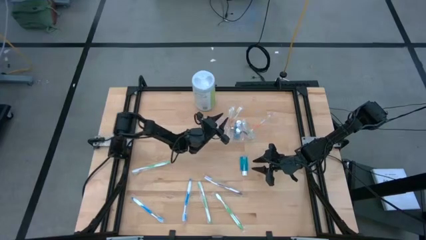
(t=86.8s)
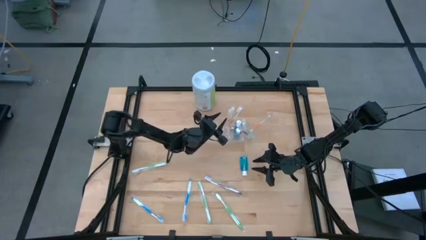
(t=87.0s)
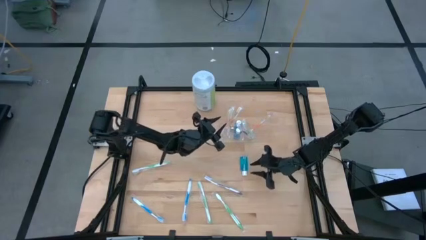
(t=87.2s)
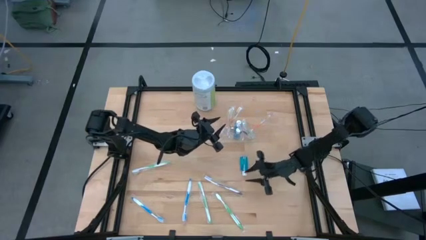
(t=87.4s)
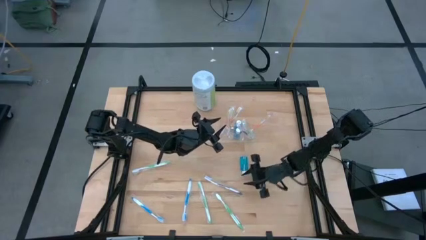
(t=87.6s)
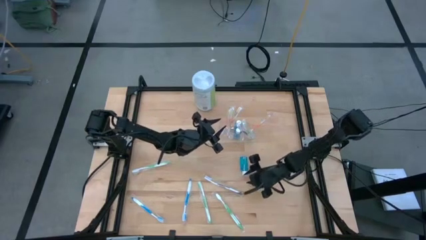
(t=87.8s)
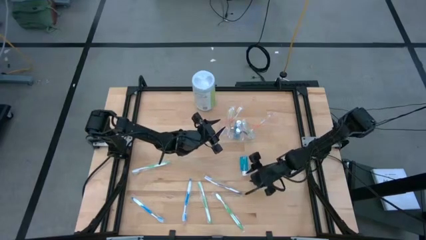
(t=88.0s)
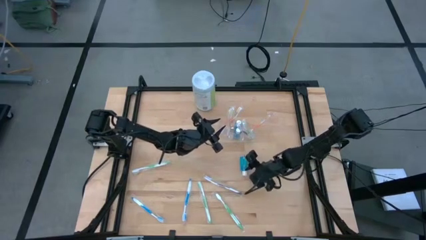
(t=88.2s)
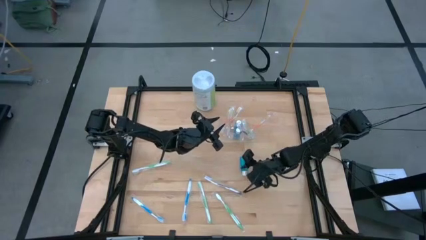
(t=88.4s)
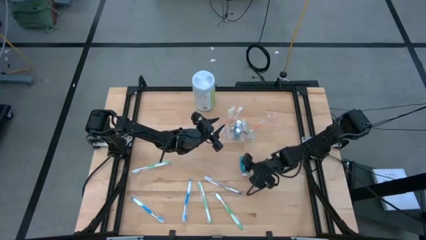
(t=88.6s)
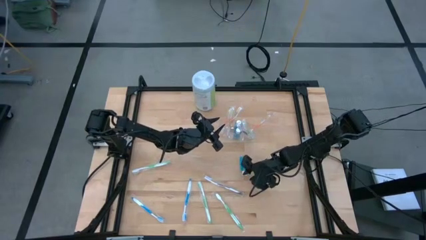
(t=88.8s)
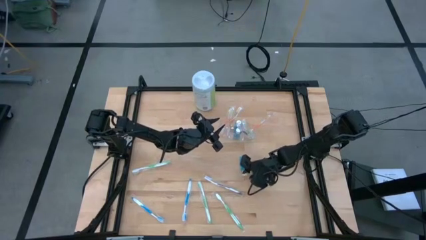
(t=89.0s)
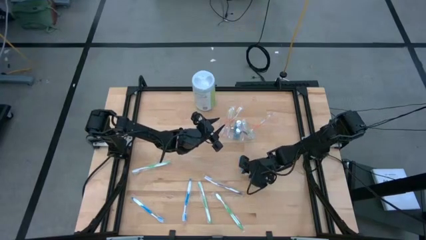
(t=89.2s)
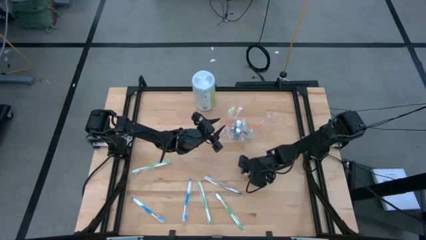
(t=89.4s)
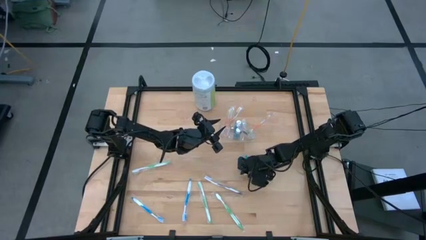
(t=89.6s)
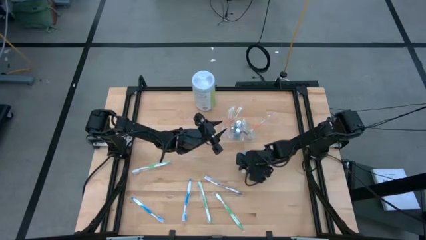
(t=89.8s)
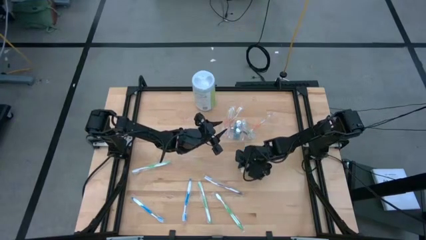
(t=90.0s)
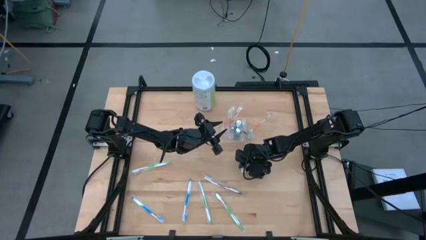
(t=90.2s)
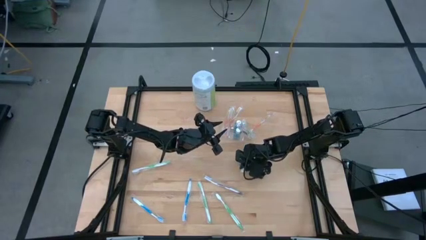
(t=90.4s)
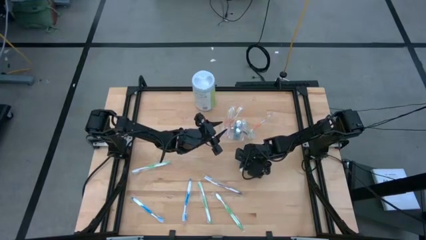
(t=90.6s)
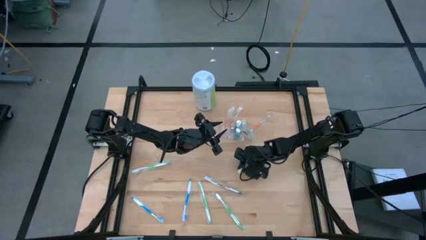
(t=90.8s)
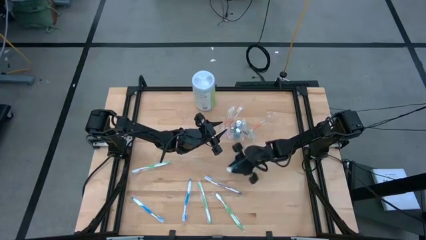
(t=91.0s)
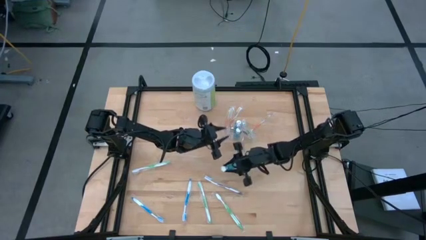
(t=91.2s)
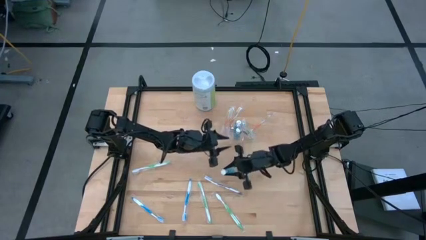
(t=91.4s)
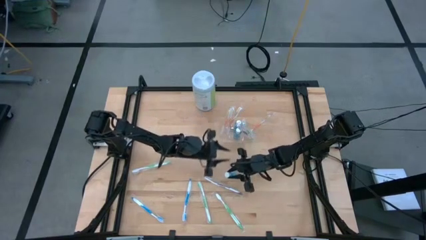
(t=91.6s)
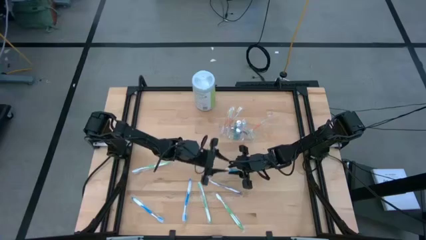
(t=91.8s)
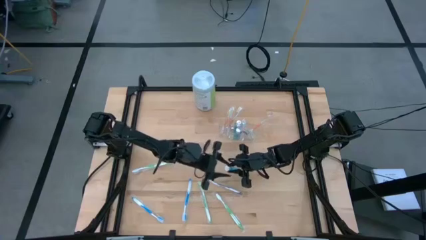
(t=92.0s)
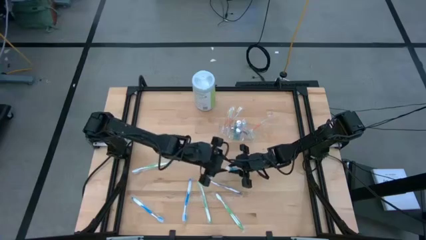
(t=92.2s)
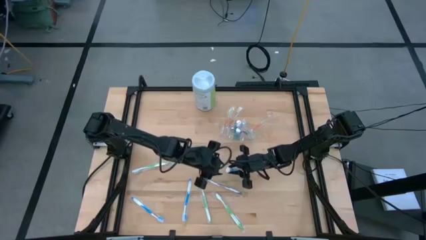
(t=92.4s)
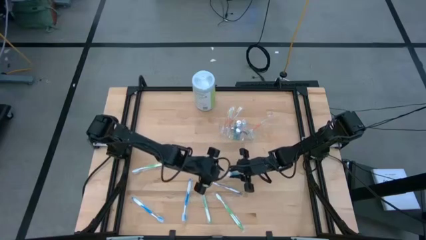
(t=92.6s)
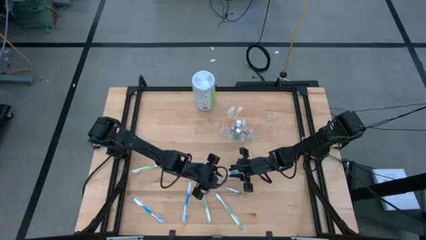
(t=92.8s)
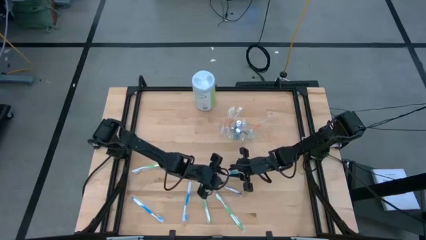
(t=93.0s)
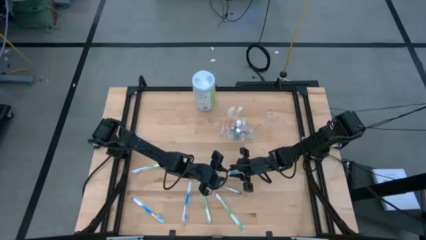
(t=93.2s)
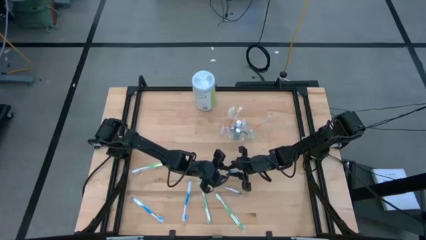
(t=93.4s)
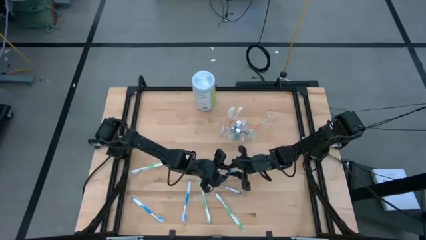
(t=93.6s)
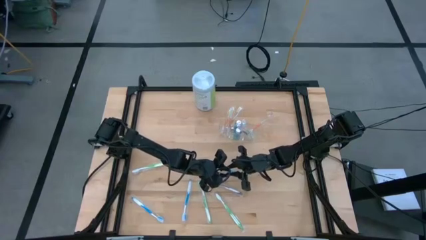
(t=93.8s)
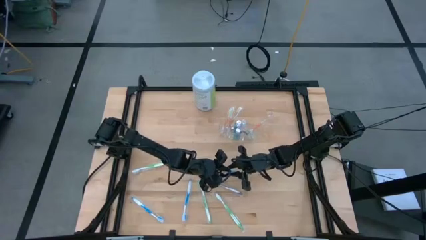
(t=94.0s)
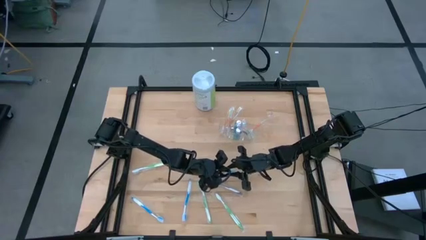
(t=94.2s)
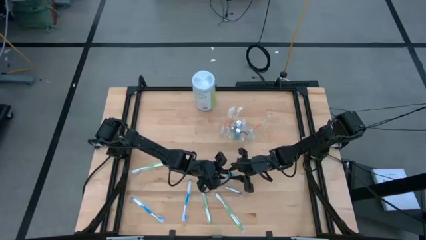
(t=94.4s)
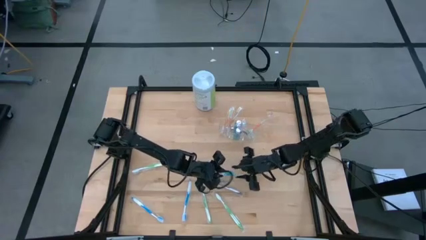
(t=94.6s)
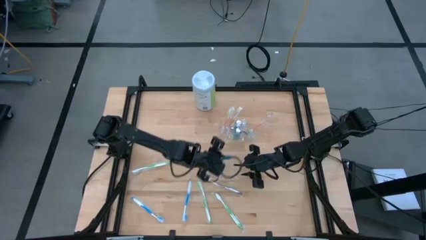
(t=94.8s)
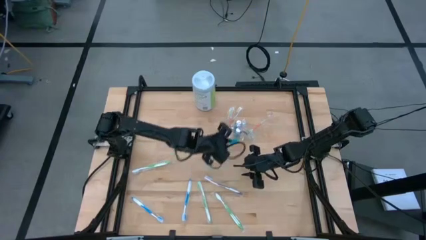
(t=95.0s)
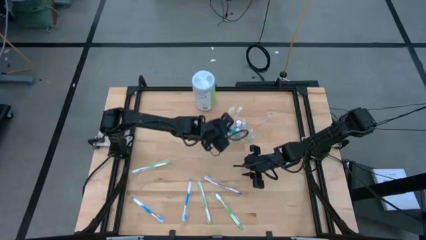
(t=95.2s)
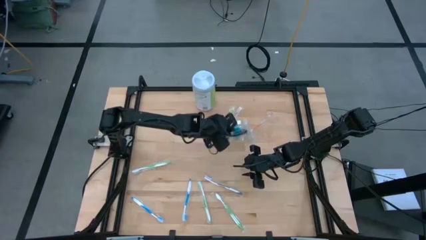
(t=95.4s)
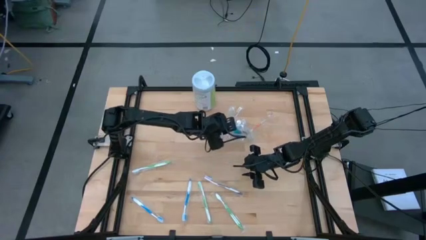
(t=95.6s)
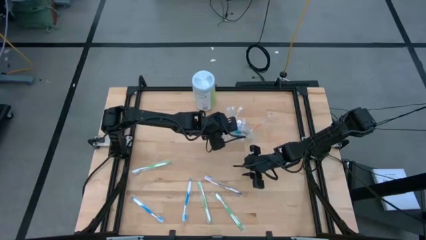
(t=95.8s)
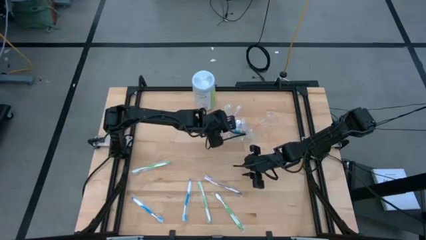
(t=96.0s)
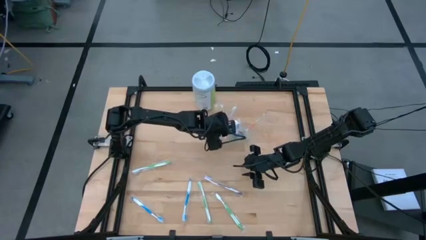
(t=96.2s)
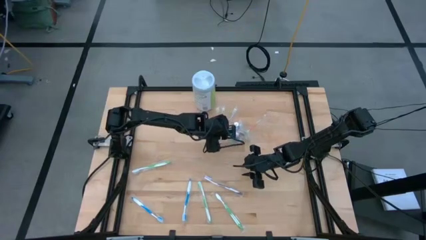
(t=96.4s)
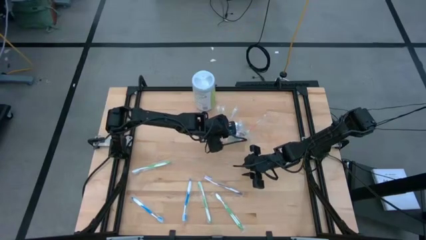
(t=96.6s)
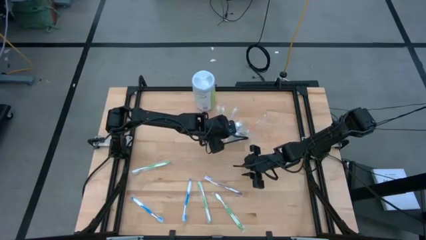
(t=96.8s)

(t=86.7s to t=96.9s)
Task: Pick & Place toothbrushing station
Put the blue mouthwash into the transparent organizer
